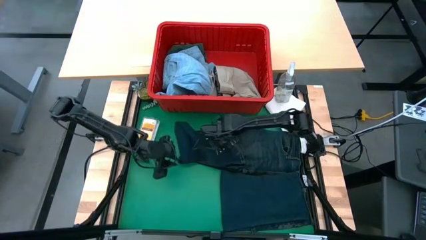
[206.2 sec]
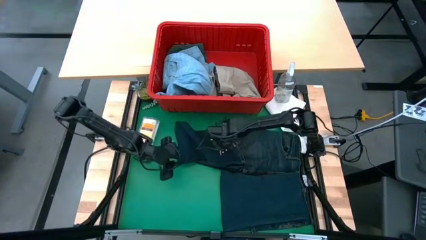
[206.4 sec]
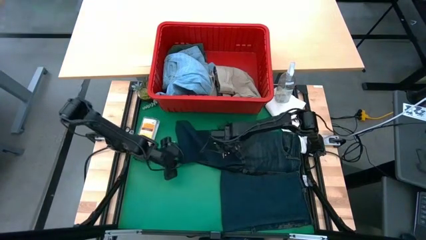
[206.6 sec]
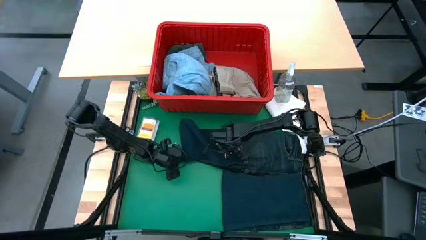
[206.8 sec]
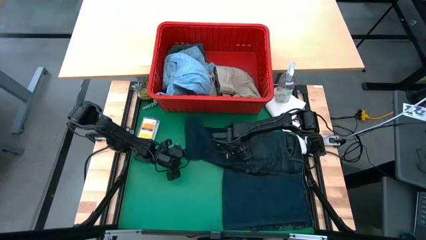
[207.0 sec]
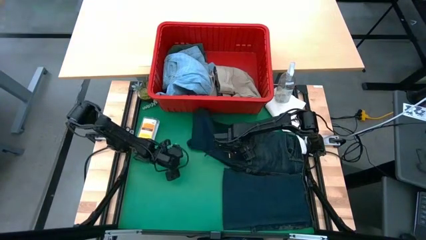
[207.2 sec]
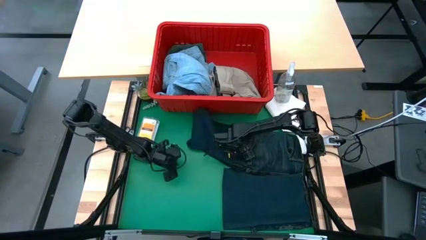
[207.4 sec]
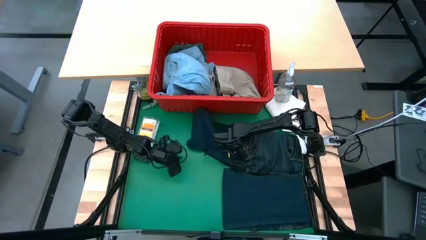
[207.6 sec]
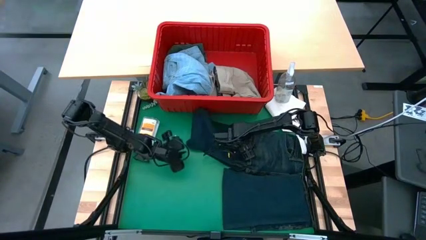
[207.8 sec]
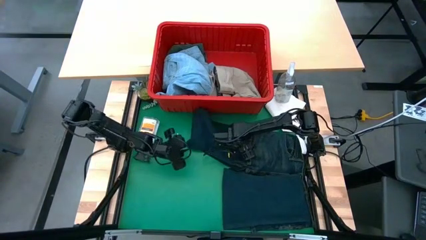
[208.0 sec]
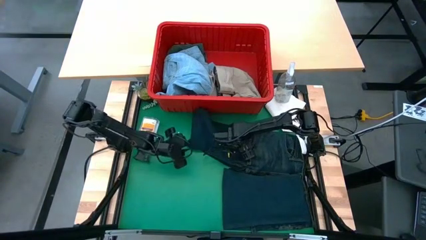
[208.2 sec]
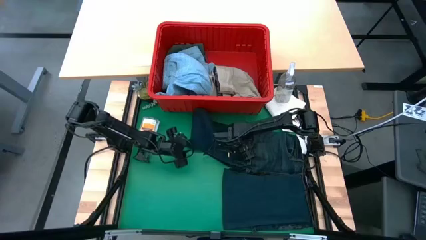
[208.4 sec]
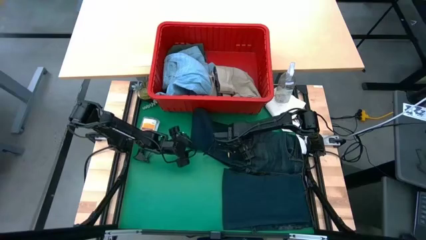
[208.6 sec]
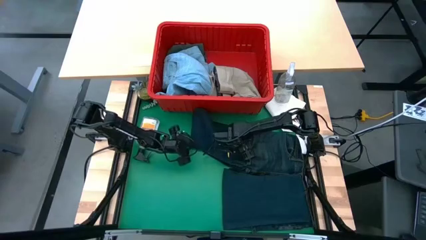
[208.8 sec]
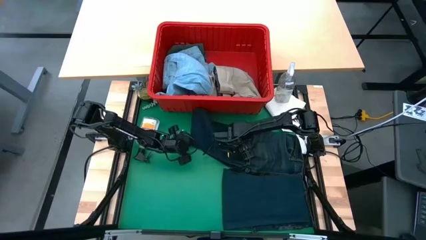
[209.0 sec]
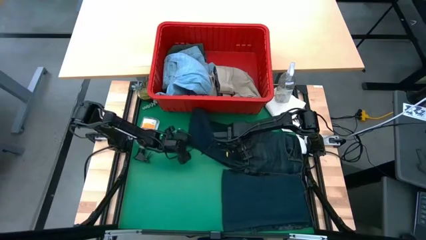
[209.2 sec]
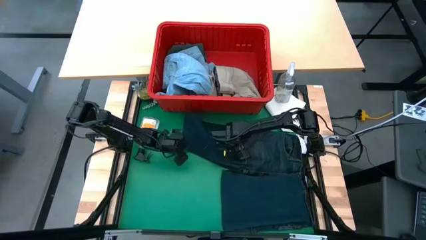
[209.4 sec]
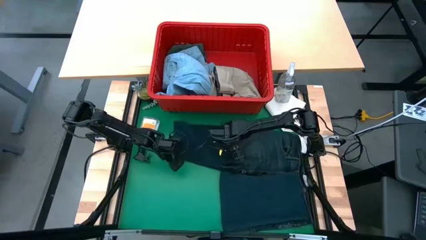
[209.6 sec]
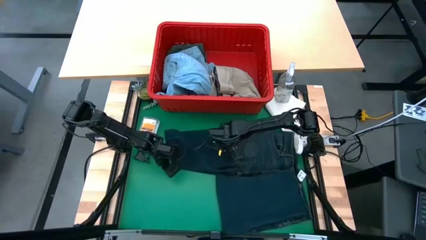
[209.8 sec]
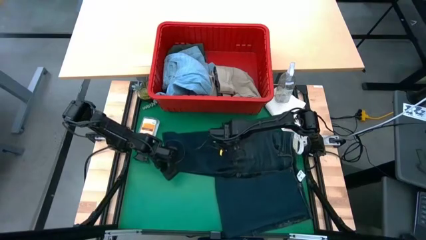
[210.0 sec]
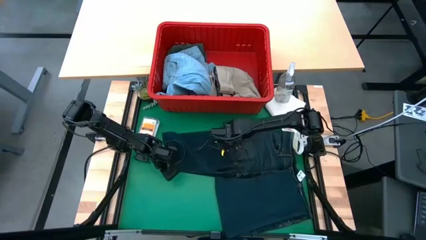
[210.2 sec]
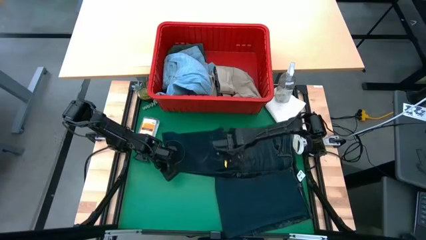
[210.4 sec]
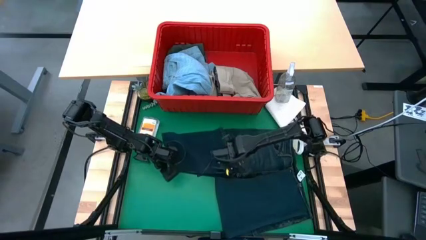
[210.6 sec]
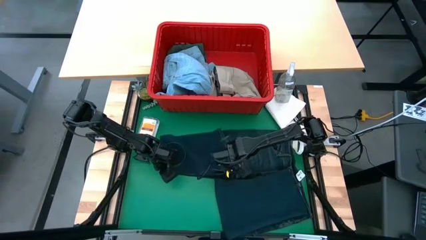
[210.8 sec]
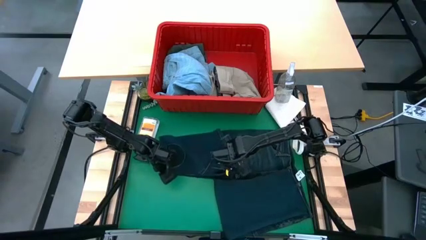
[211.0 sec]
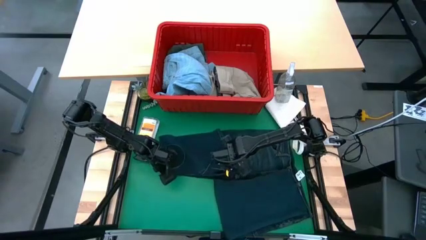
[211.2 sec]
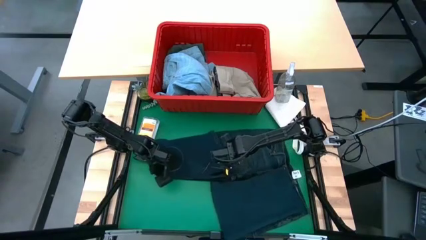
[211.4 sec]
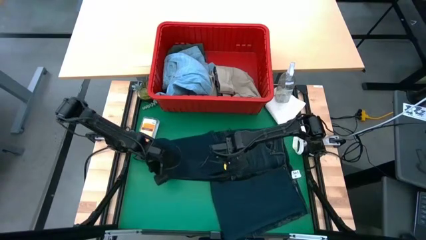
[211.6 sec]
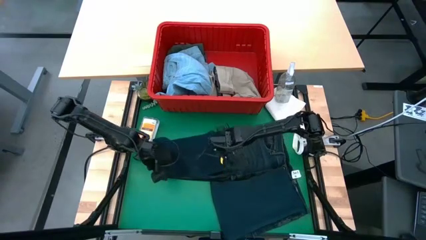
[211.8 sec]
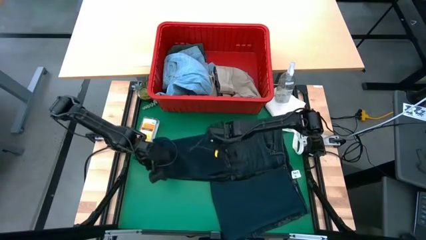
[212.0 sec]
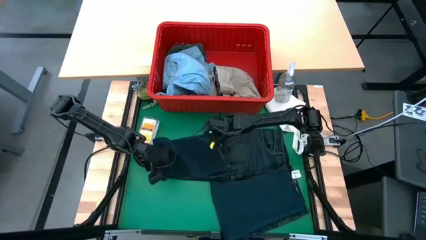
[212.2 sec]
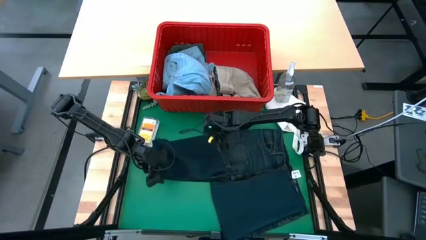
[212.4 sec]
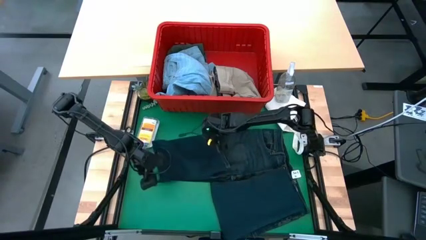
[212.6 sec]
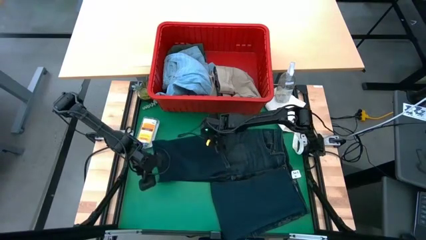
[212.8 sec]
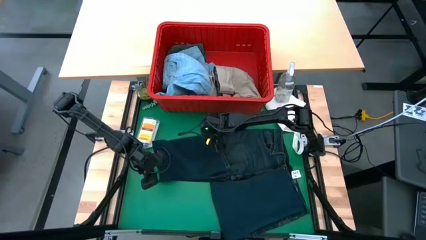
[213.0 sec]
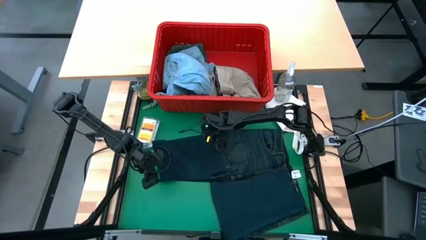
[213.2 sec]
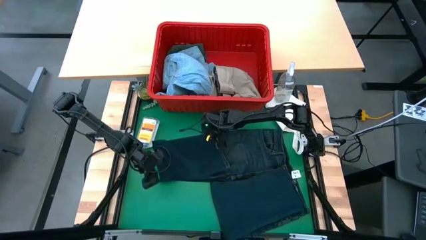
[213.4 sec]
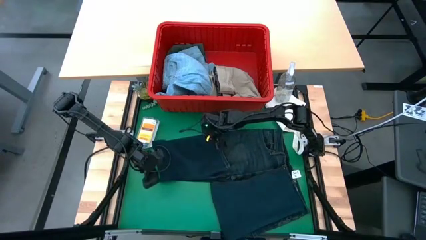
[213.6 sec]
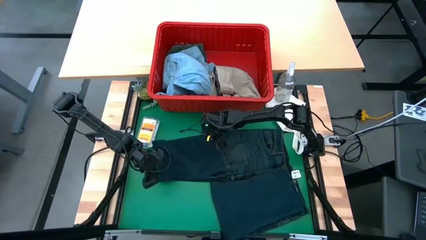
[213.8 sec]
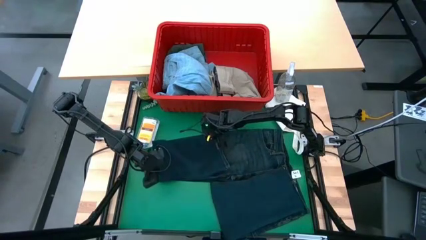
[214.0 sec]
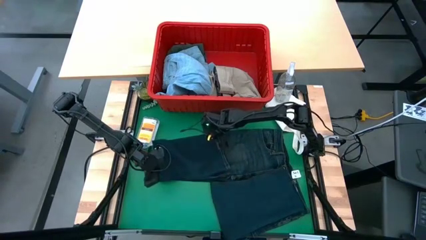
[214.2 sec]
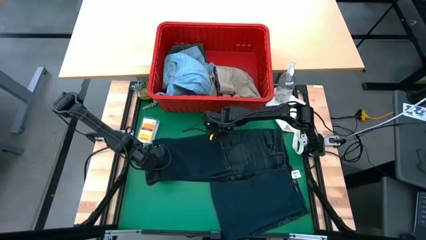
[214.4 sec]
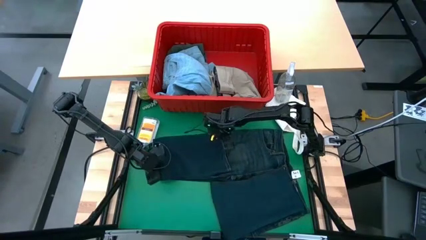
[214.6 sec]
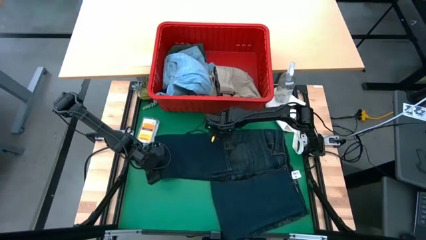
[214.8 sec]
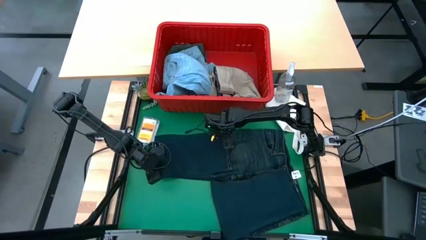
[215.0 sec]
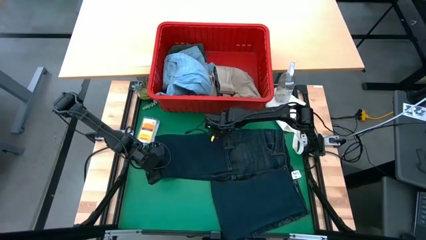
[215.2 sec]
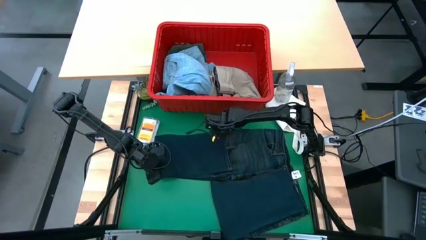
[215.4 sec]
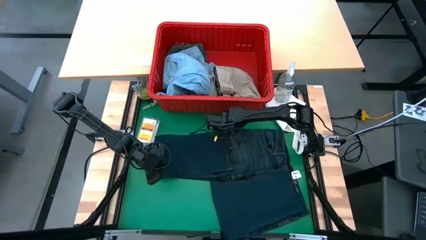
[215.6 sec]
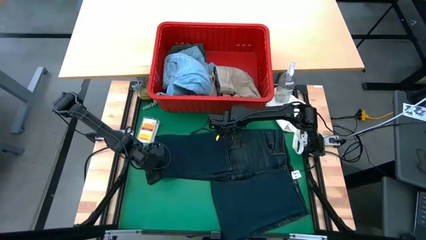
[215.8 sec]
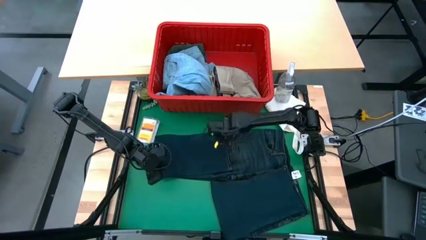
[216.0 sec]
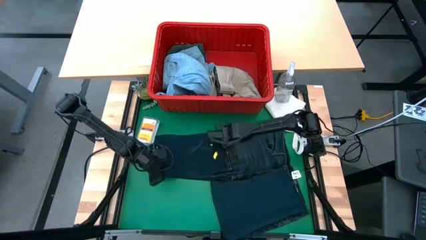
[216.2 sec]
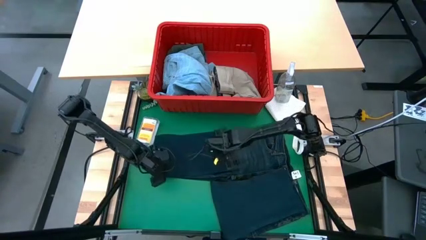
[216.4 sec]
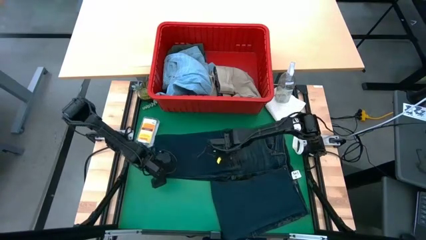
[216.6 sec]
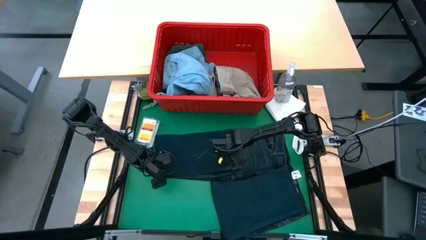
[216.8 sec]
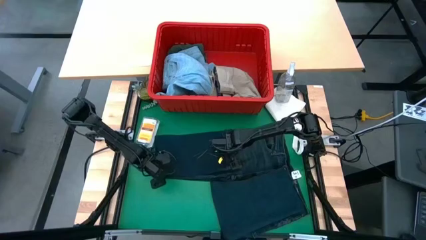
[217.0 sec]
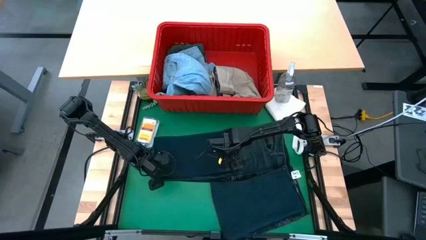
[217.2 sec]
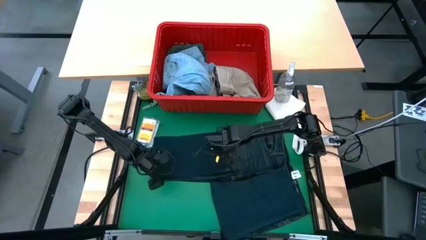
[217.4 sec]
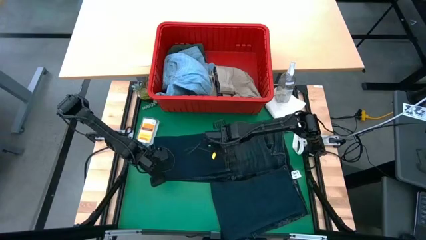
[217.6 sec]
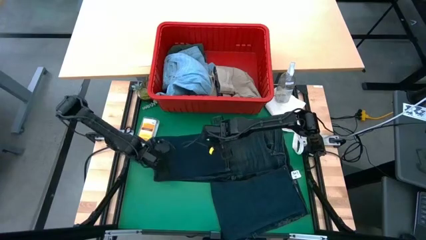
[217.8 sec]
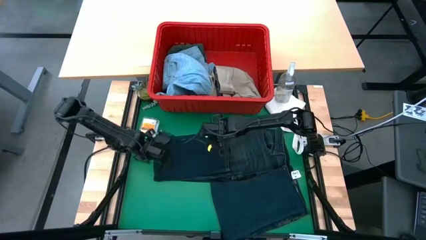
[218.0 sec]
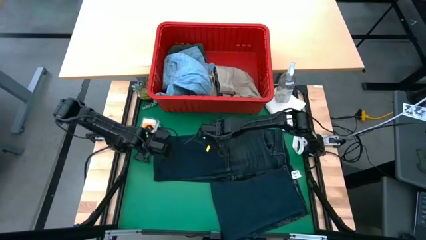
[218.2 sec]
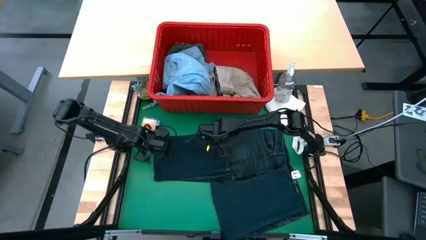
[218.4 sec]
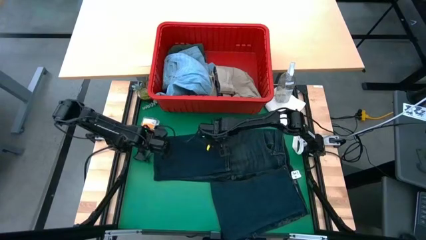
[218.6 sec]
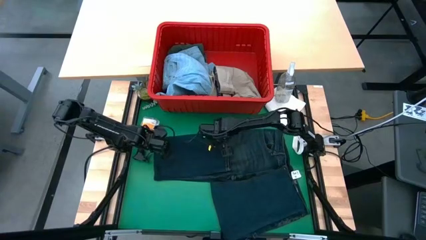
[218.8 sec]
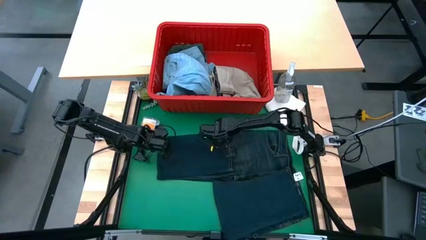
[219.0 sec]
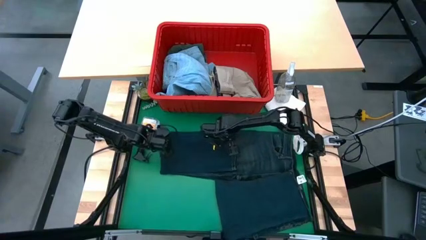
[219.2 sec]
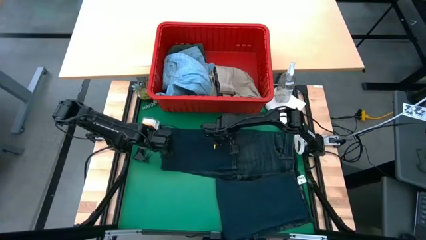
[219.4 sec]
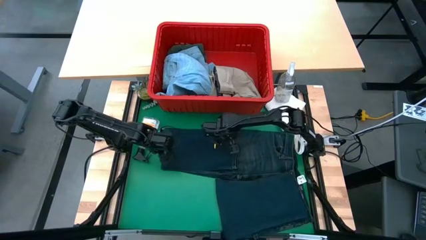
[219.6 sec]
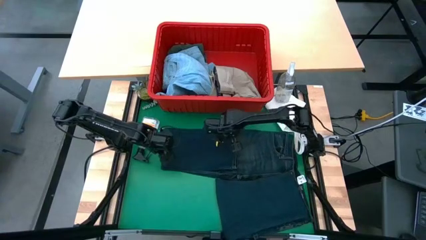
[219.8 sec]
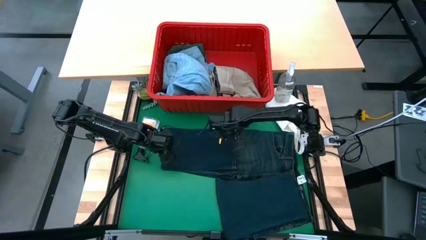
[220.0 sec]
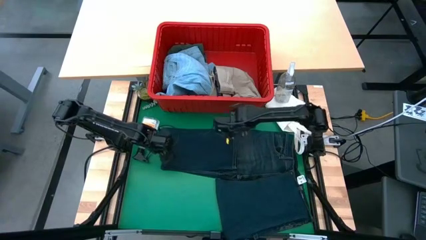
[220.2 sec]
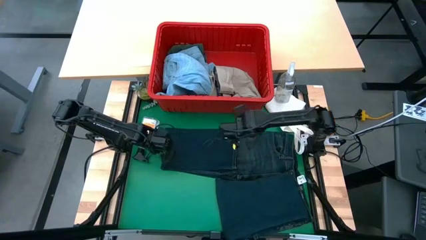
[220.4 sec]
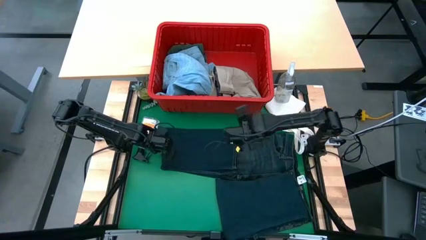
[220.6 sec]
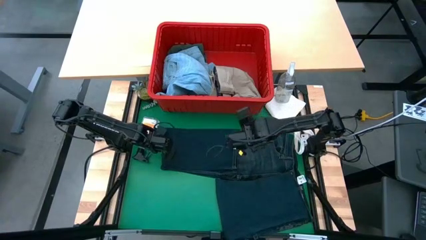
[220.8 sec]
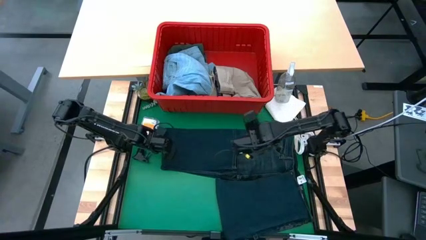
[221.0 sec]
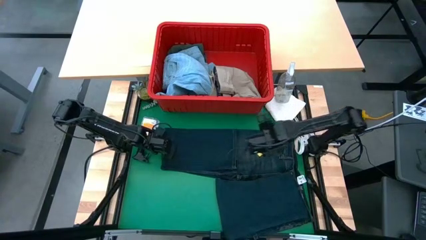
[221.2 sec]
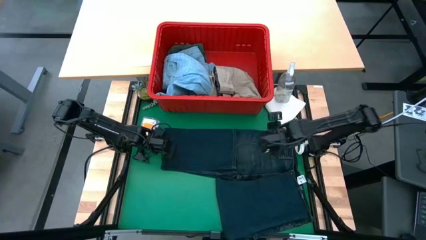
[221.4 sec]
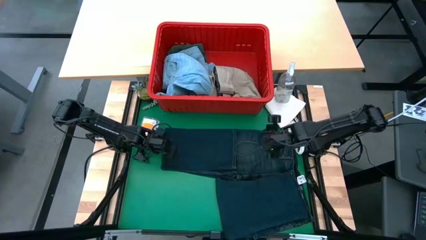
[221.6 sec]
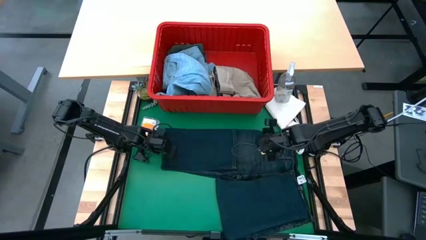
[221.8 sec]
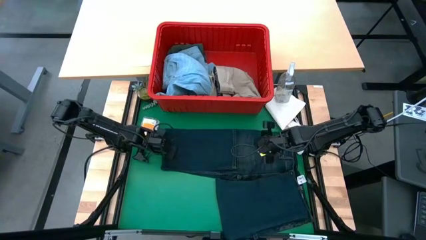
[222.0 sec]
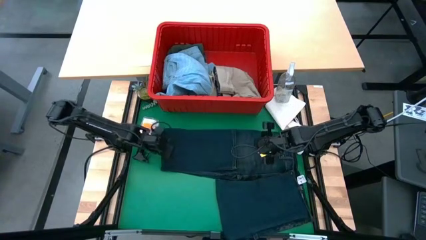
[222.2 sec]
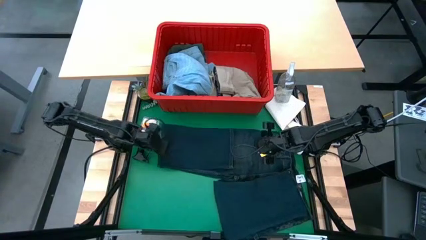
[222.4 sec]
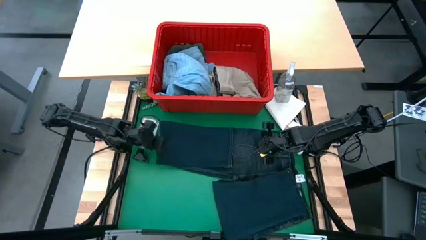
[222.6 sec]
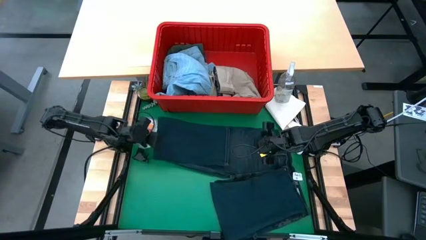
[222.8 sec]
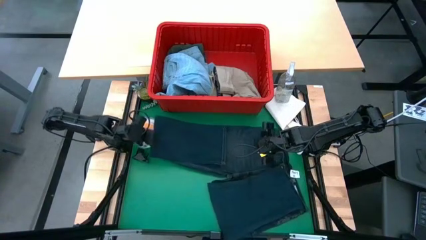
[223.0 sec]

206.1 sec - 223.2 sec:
Task: Fold laundry
Fold the dark blue jeans
